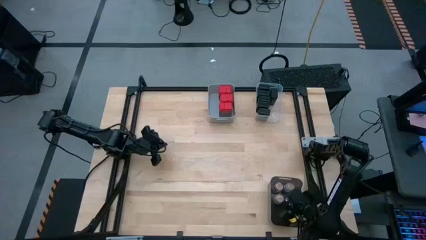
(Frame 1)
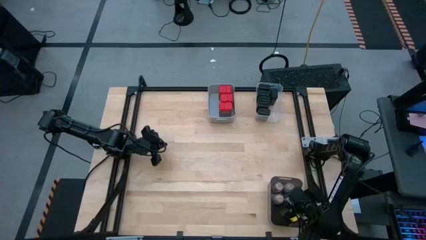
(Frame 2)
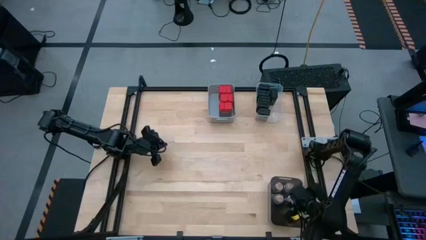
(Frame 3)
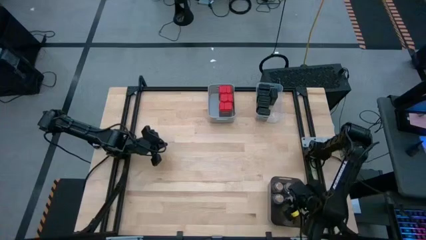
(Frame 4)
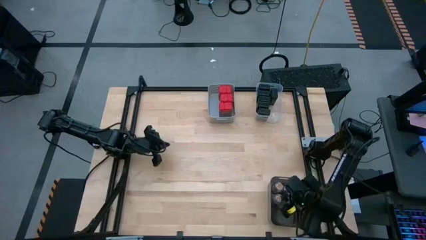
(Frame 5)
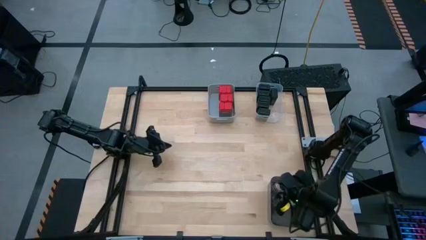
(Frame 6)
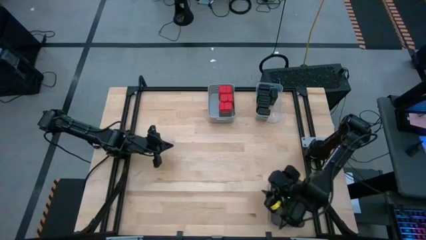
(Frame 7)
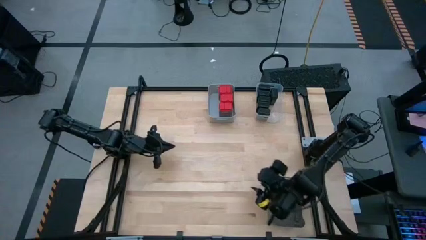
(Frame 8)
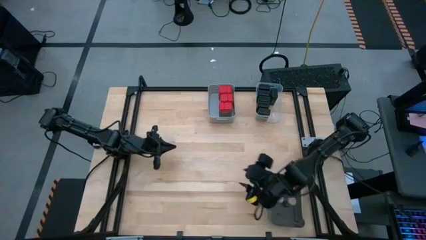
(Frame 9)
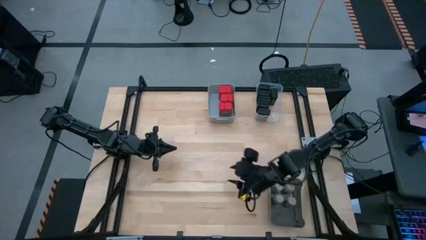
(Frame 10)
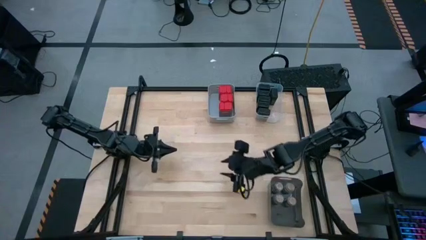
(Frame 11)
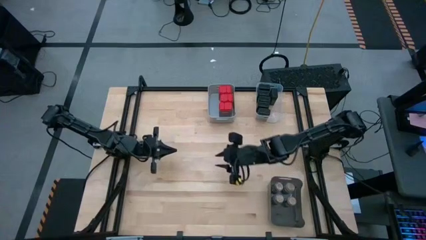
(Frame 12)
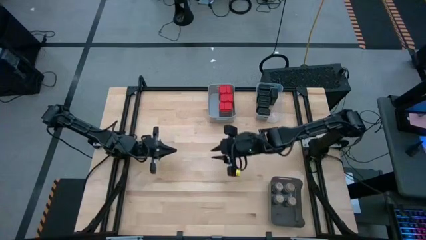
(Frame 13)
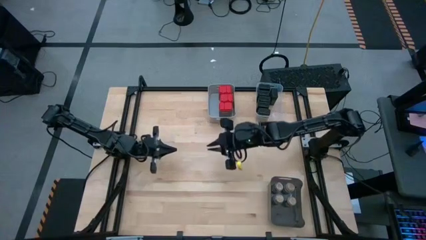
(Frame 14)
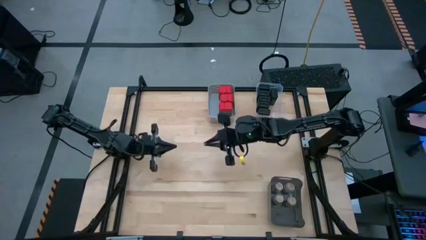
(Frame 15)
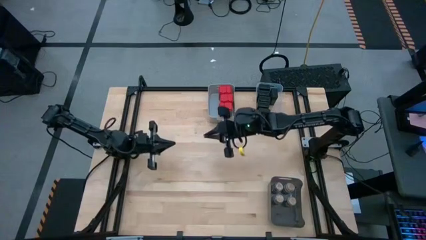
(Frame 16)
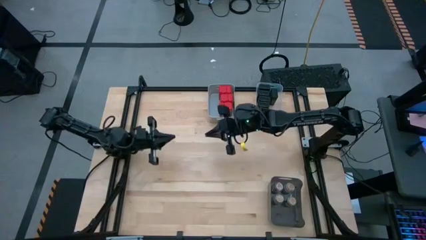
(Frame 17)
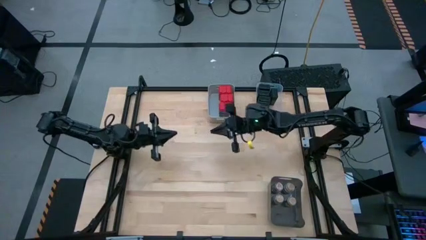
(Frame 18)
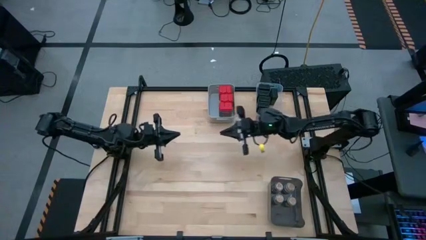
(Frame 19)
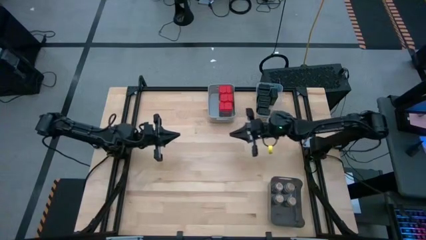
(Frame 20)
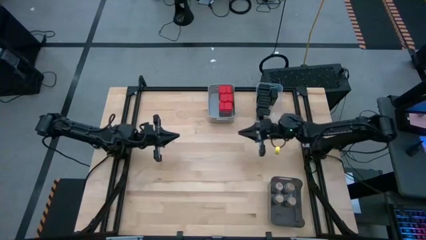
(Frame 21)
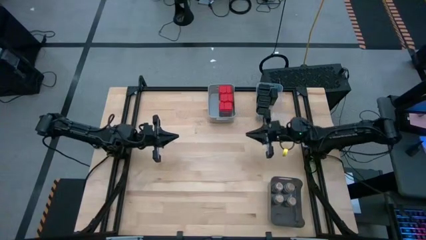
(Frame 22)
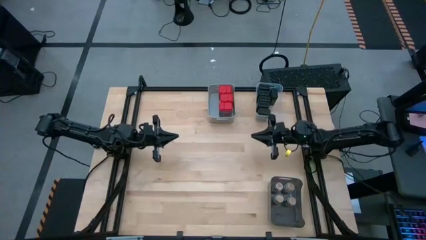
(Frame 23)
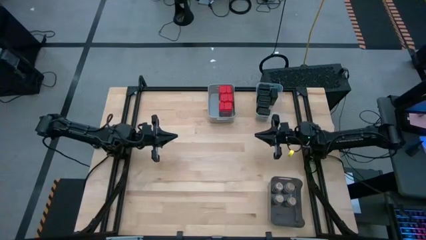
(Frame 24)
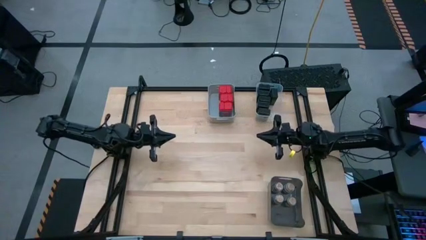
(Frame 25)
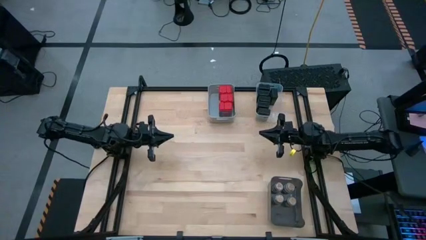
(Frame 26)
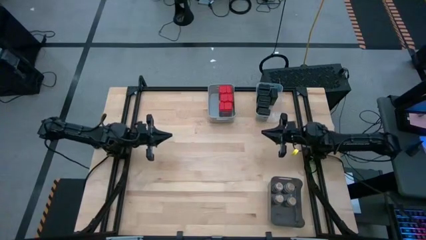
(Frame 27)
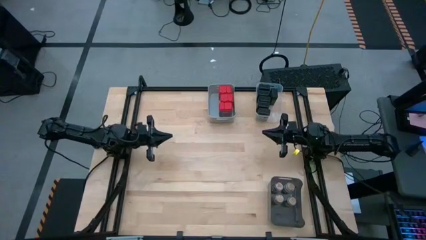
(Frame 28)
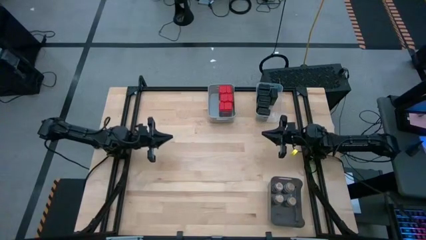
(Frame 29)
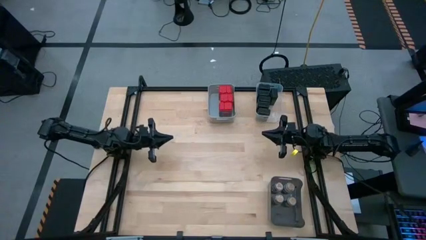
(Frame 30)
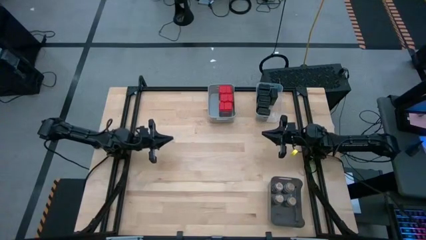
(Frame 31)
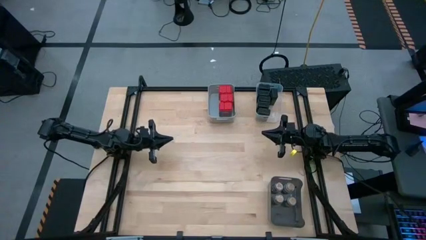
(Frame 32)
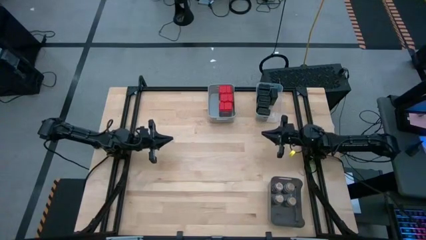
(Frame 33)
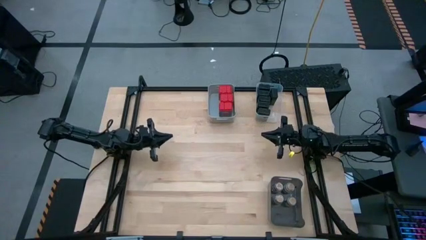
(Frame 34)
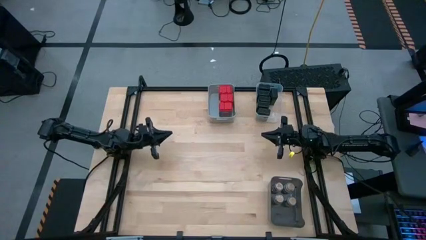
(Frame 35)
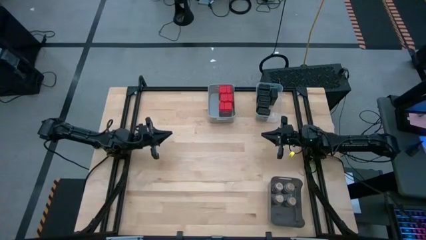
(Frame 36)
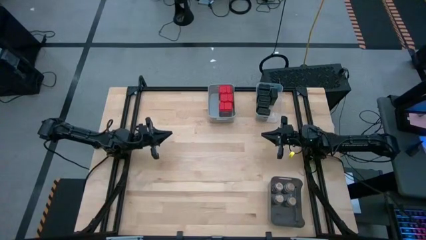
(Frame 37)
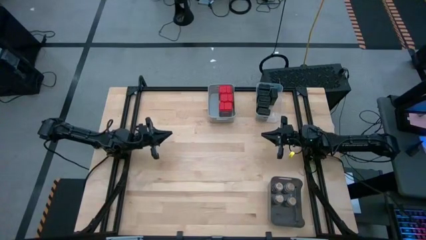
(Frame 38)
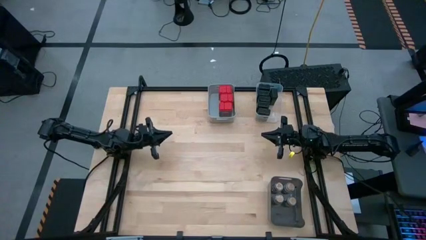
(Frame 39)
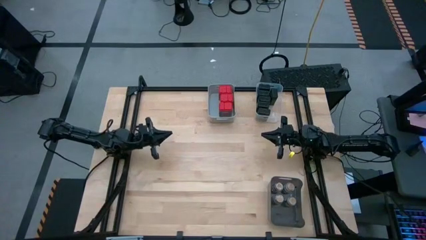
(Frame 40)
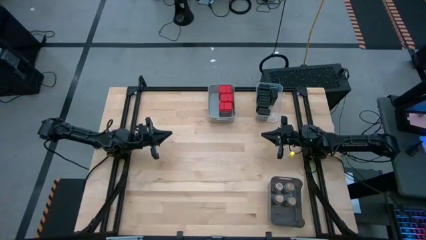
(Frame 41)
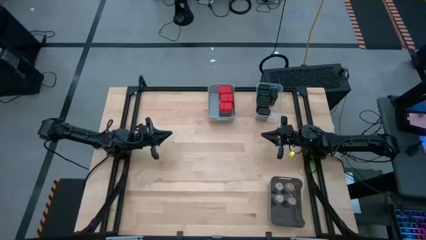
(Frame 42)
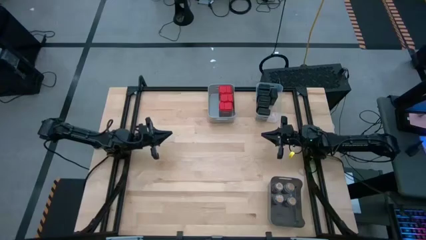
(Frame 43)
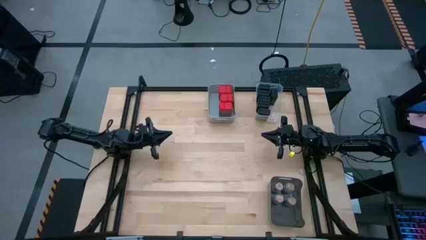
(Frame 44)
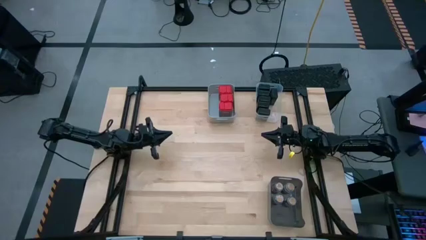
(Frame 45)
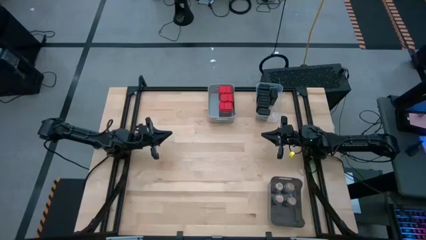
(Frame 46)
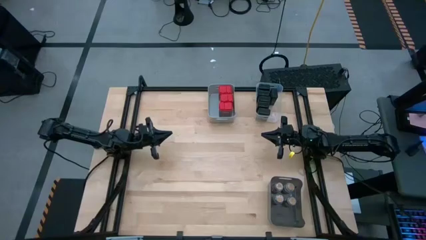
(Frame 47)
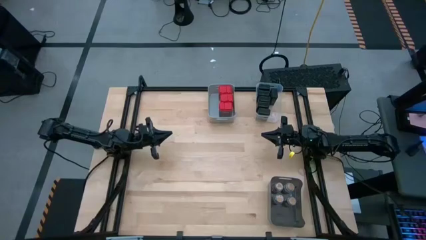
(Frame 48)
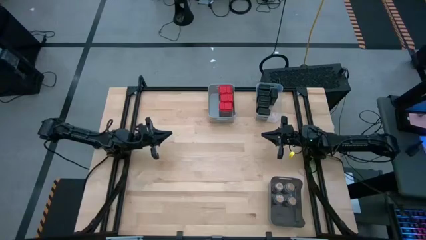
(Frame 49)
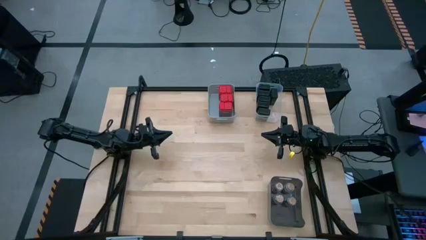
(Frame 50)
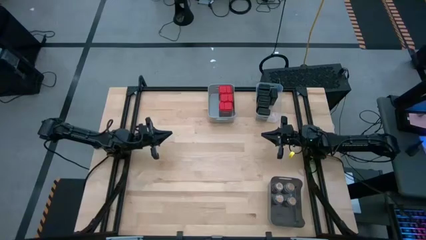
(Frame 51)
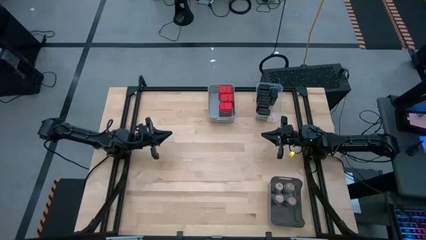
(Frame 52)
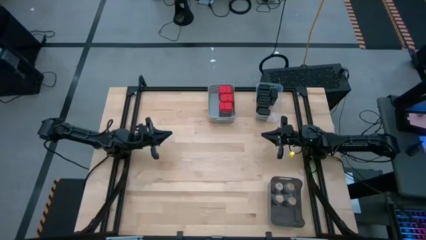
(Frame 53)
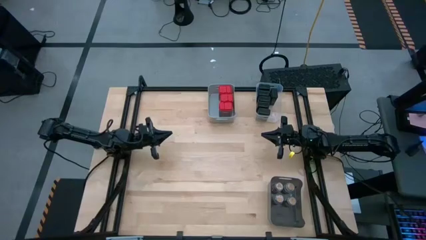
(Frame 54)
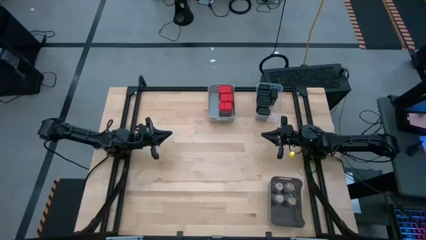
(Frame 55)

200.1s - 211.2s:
Task: Sort spices by type
Return to Home Position
